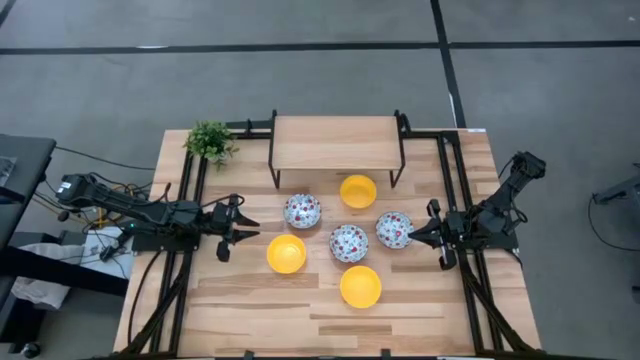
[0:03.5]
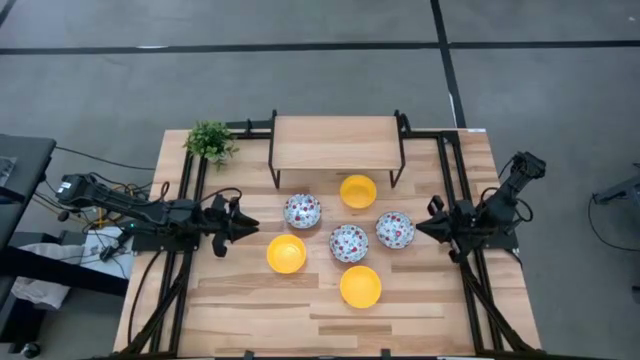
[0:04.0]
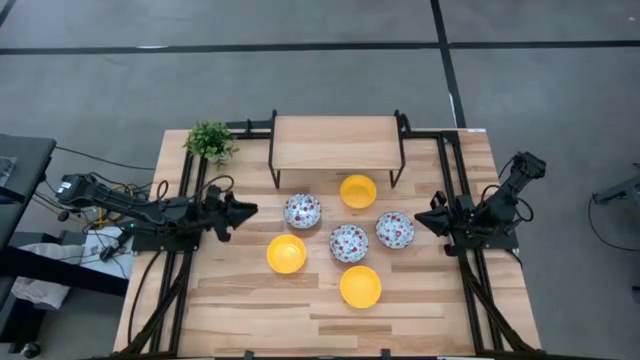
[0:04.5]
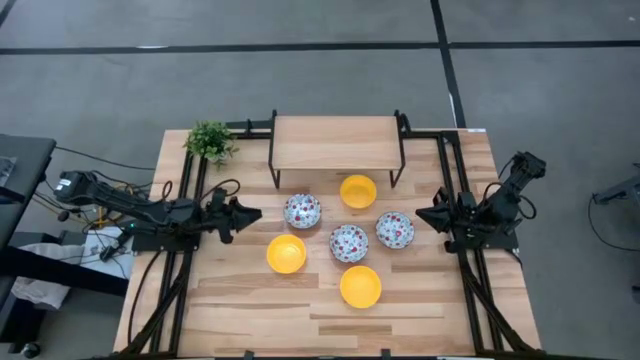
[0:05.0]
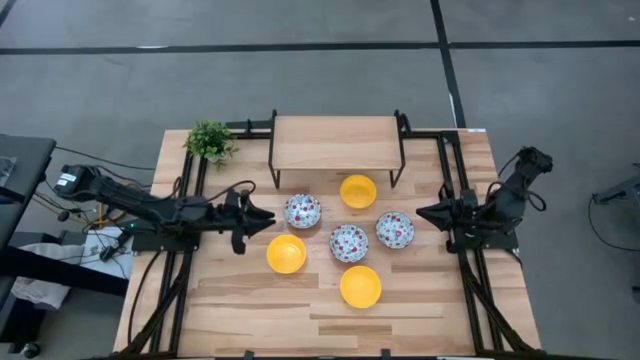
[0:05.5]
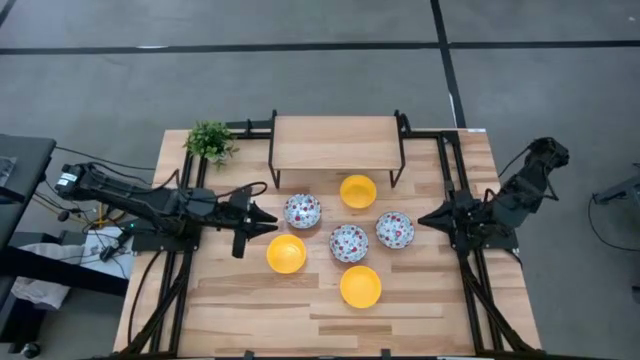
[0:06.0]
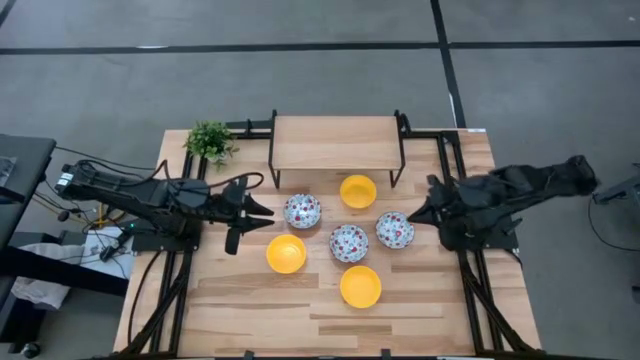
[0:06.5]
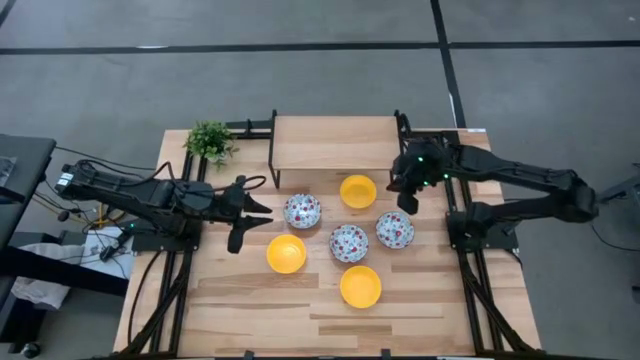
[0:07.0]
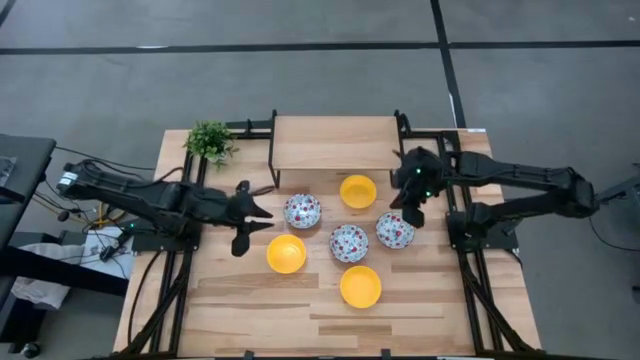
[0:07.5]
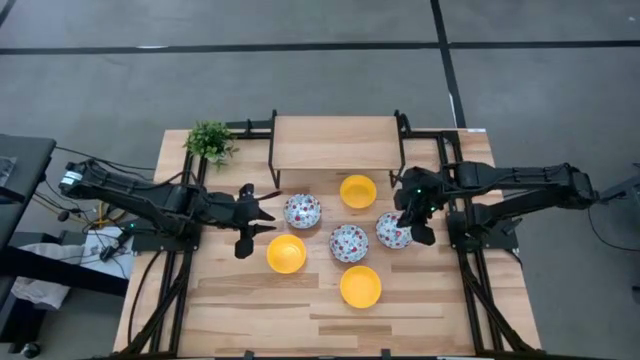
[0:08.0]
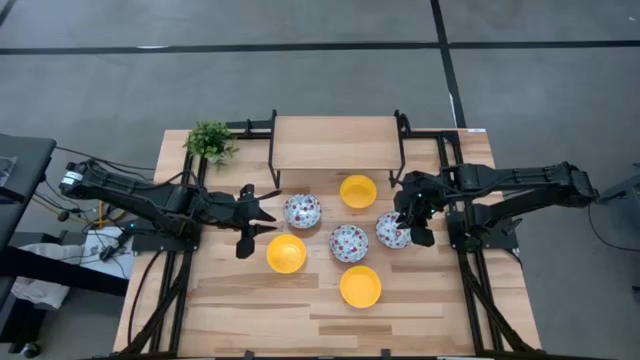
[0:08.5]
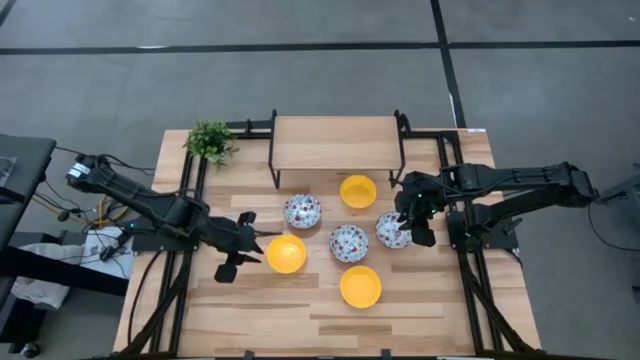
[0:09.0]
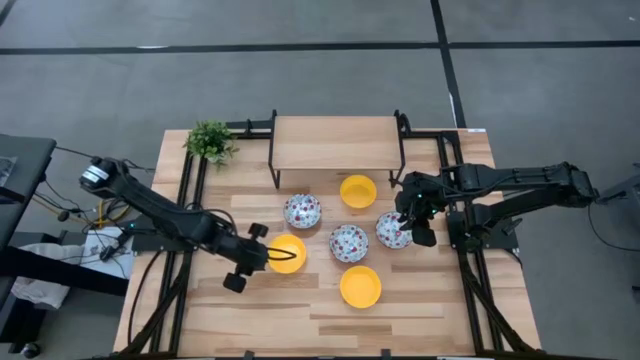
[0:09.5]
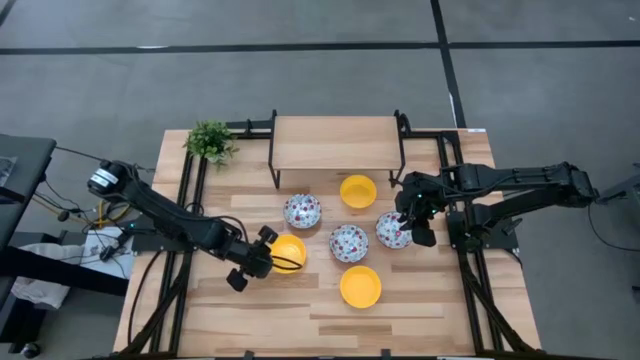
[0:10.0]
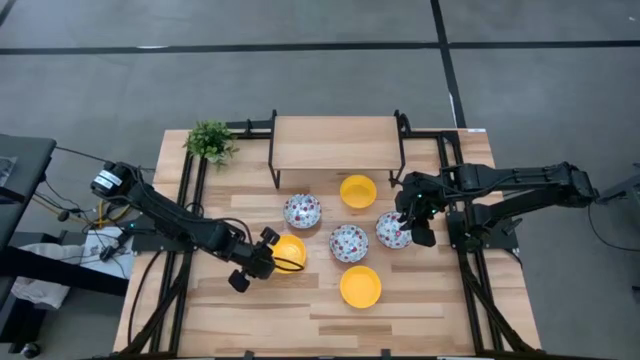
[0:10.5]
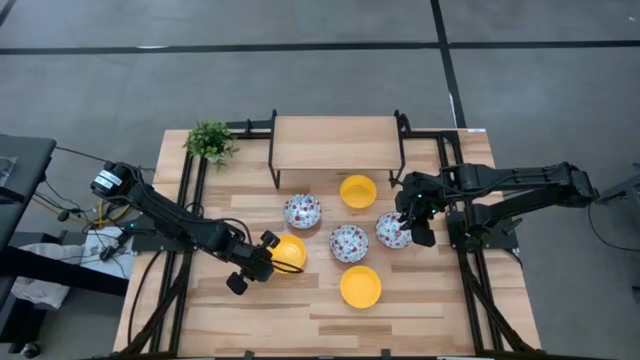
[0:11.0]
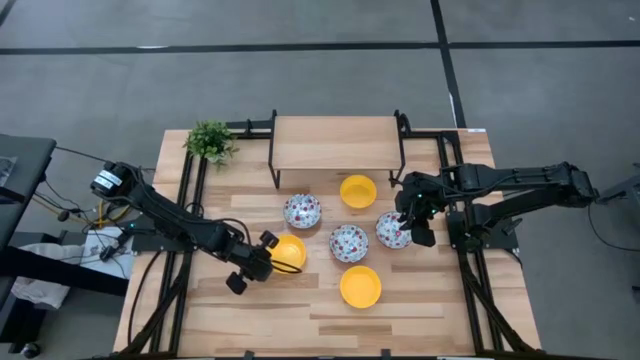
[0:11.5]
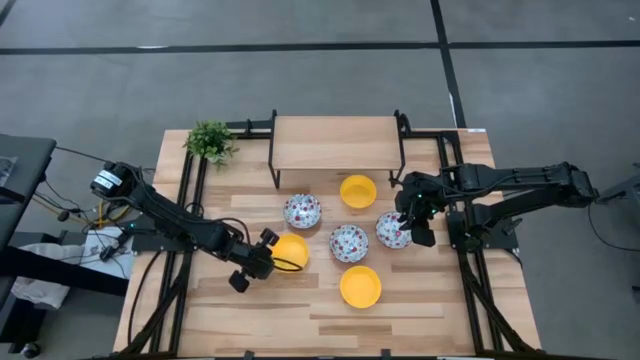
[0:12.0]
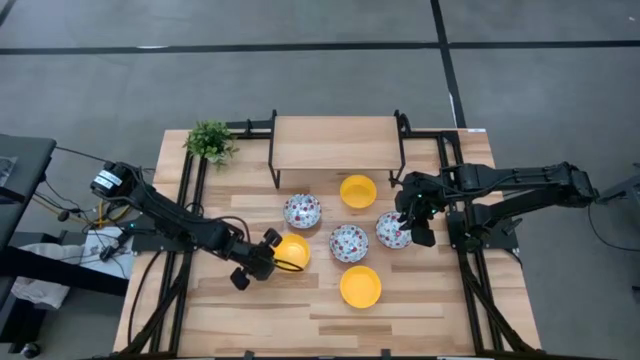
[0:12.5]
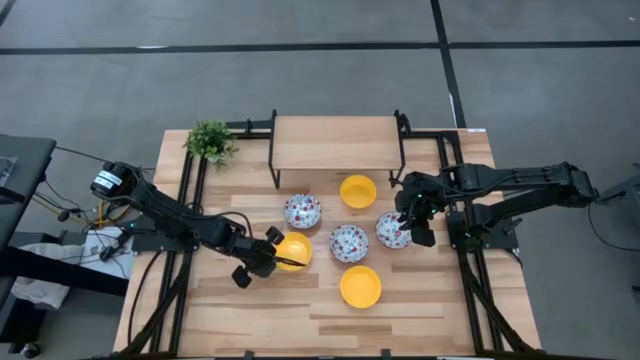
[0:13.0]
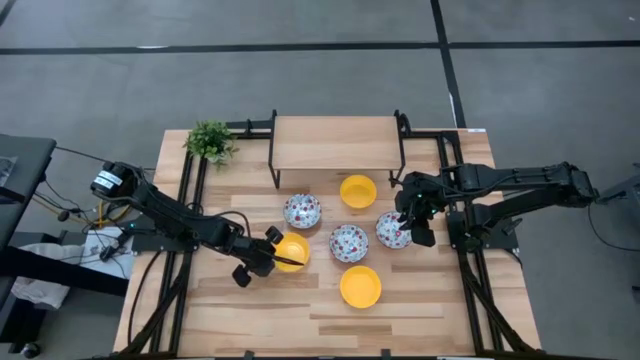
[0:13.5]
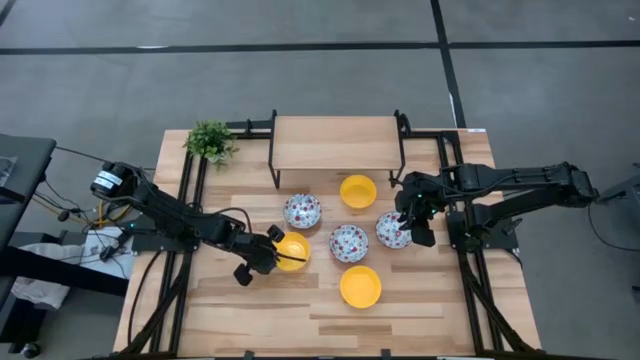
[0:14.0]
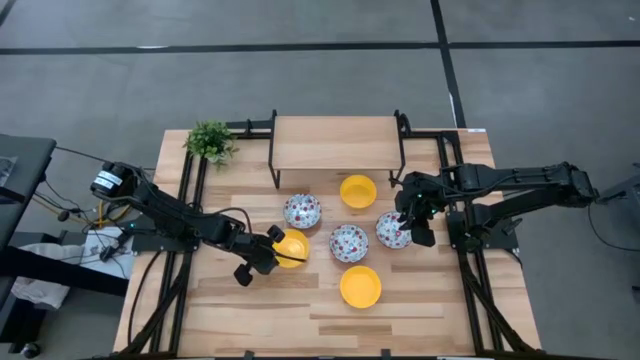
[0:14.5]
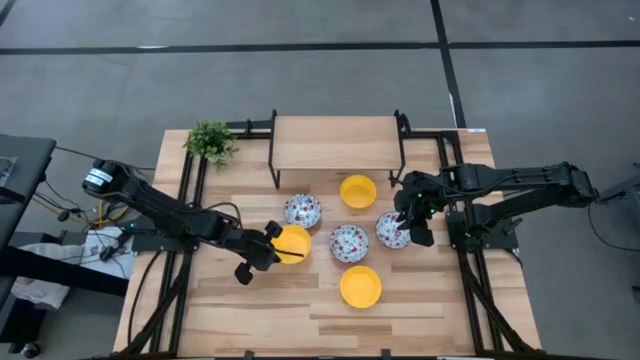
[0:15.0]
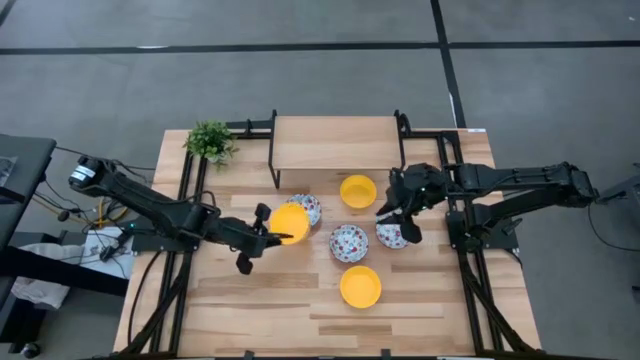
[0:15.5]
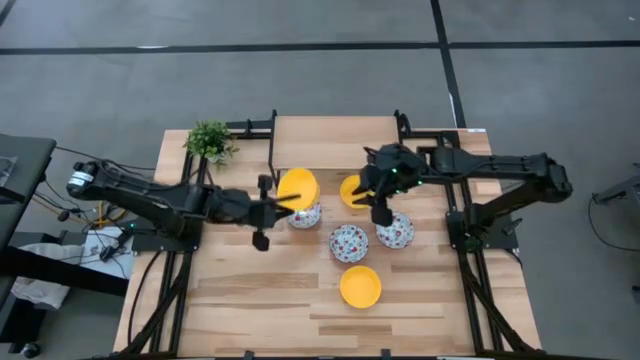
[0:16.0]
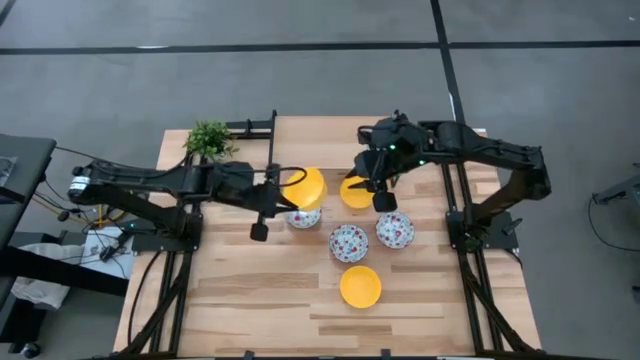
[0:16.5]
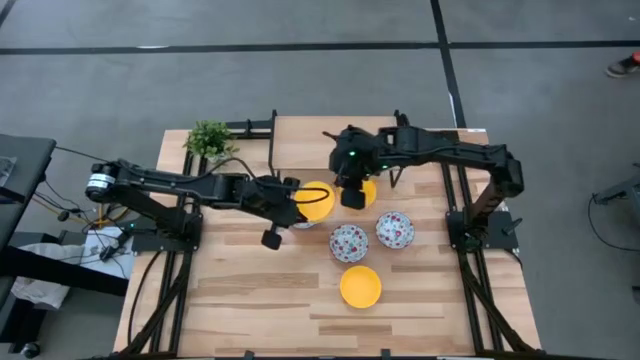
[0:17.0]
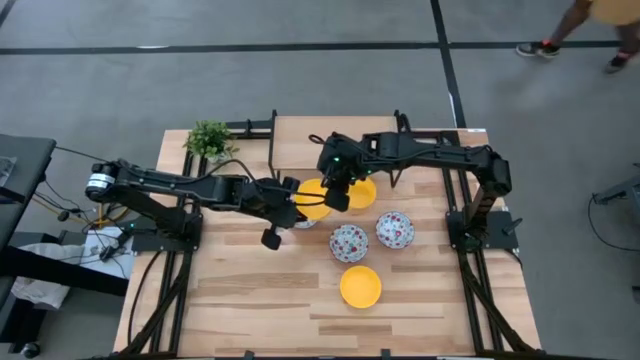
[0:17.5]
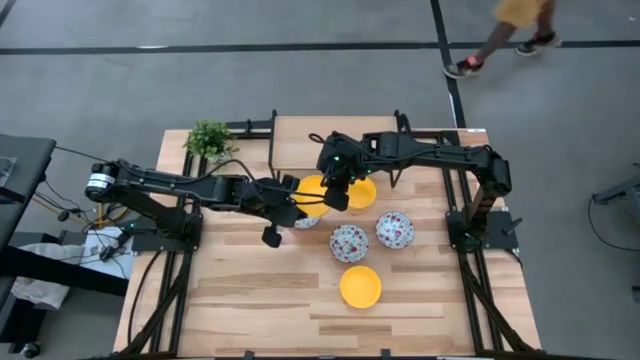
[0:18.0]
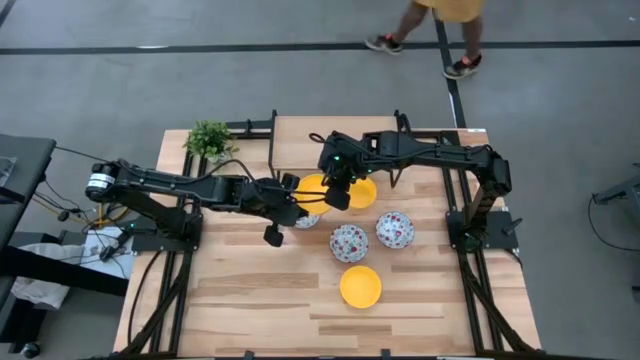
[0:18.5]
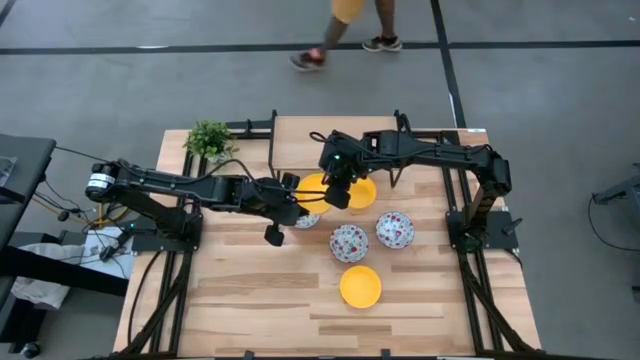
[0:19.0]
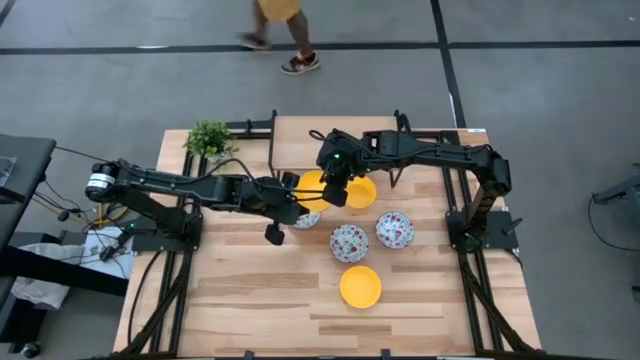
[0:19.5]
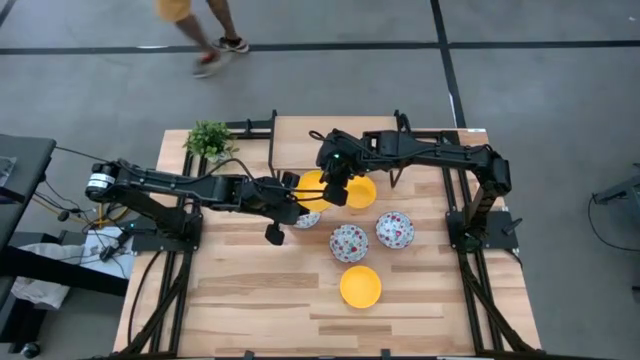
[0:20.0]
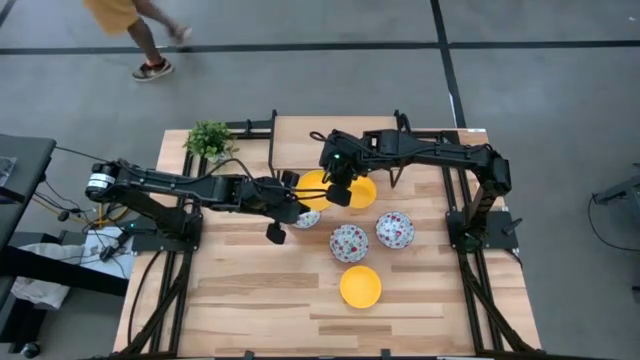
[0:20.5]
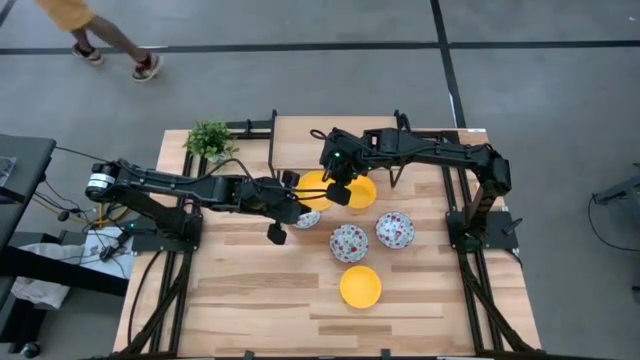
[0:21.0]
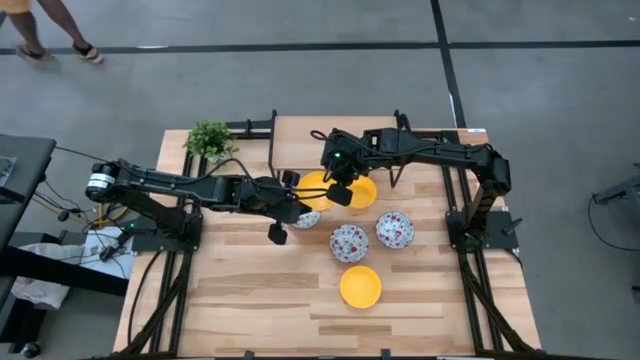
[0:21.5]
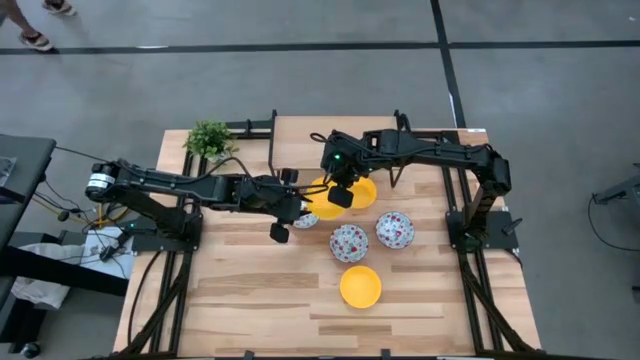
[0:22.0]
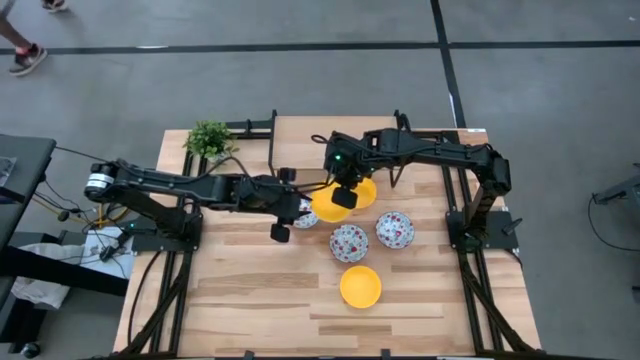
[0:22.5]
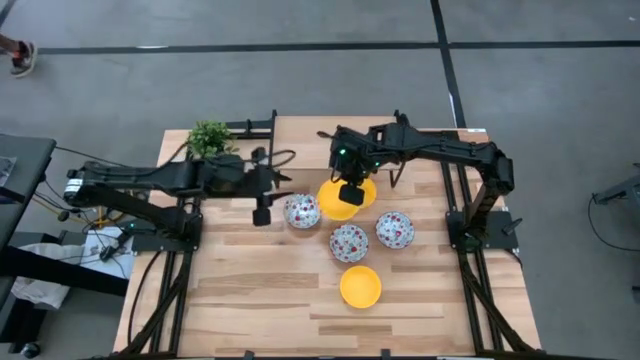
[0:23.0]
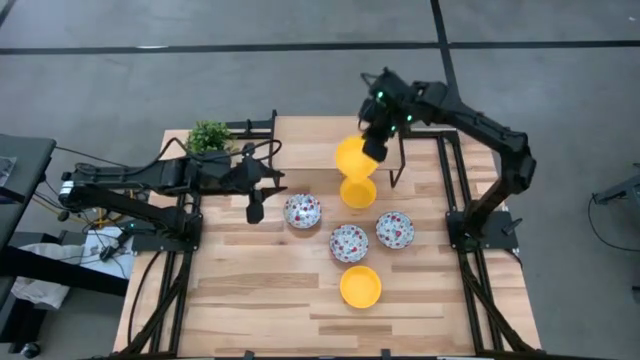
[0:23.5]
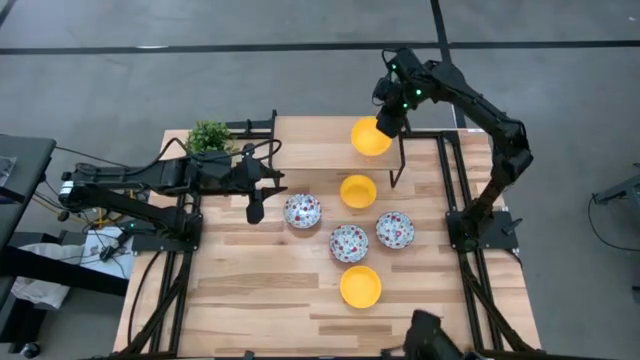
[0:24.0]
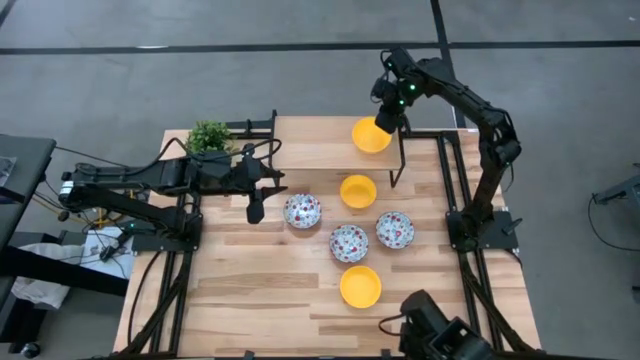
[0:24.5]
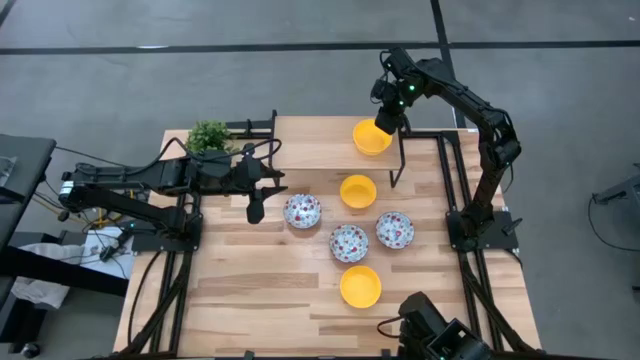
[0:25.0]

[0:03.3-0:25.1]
Task: Pick & Place Mini bowls
Put the left yellow bowl on the shelf
